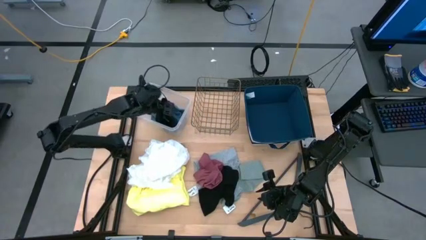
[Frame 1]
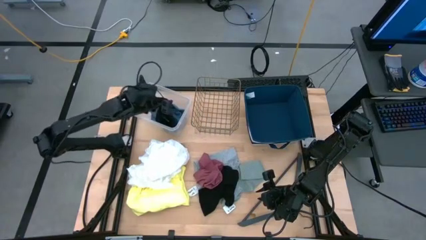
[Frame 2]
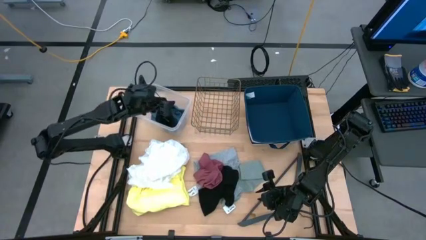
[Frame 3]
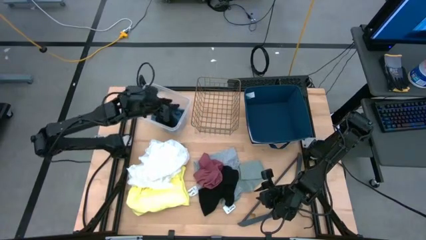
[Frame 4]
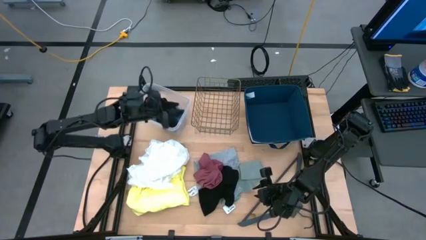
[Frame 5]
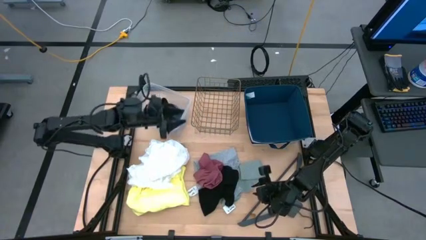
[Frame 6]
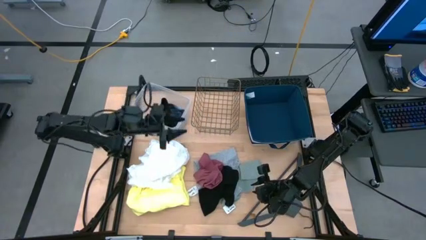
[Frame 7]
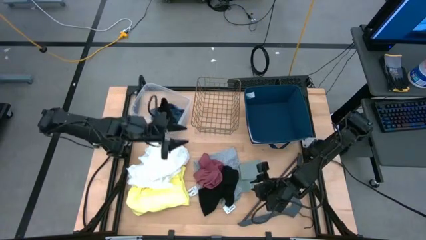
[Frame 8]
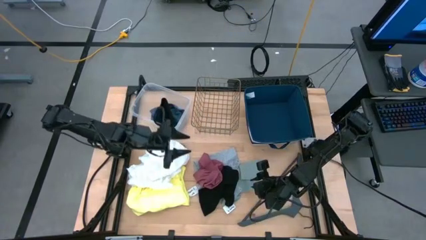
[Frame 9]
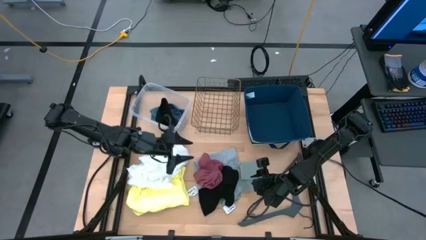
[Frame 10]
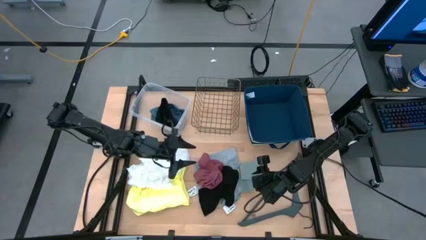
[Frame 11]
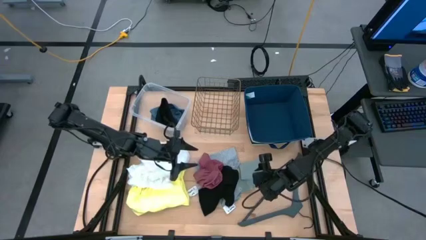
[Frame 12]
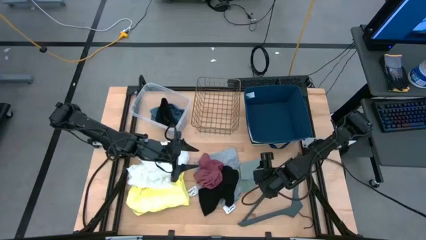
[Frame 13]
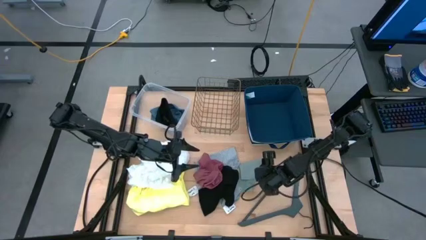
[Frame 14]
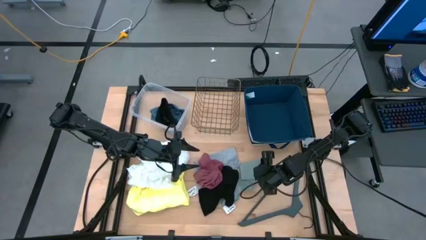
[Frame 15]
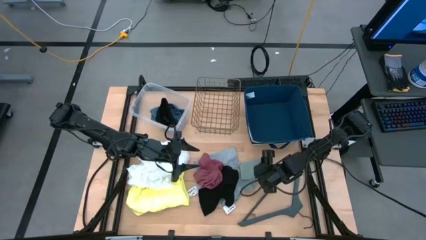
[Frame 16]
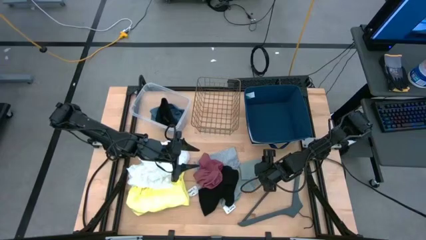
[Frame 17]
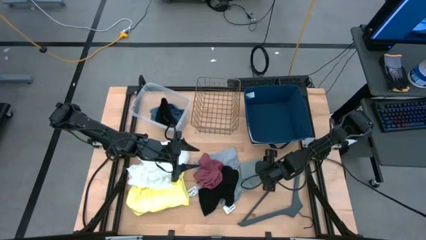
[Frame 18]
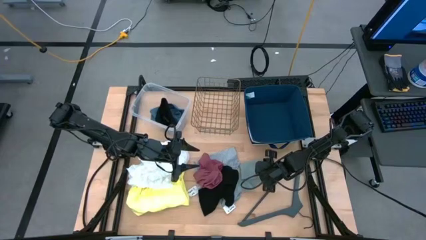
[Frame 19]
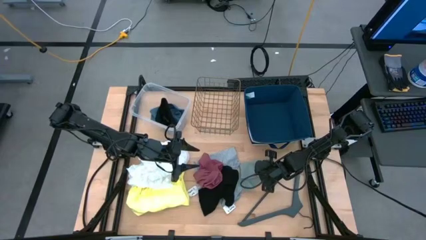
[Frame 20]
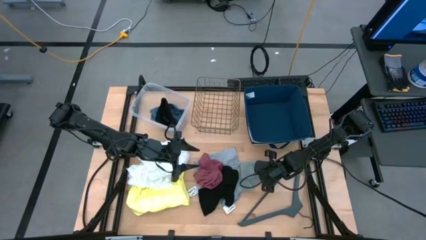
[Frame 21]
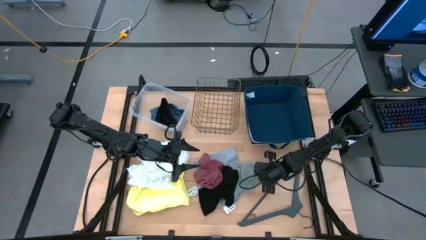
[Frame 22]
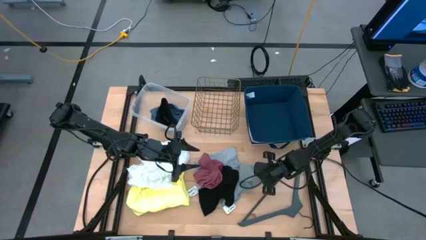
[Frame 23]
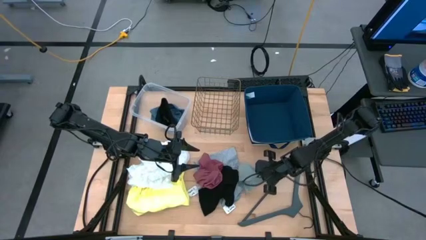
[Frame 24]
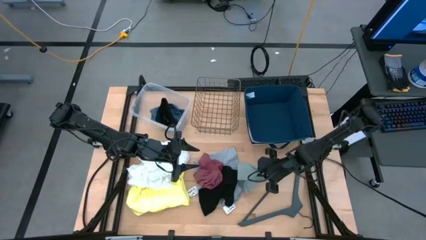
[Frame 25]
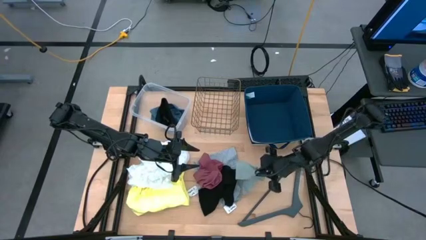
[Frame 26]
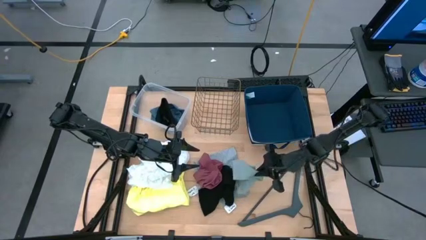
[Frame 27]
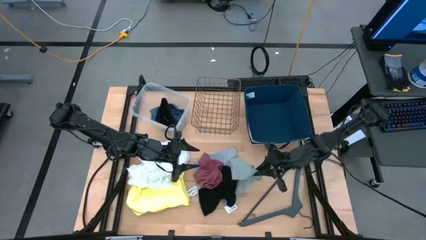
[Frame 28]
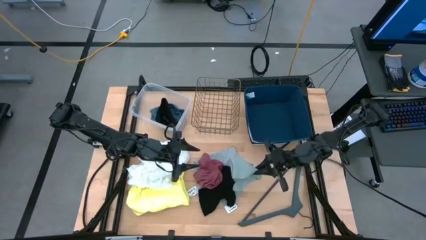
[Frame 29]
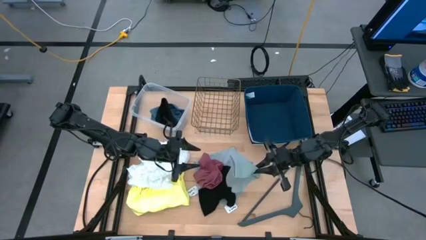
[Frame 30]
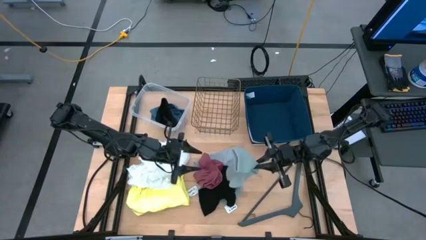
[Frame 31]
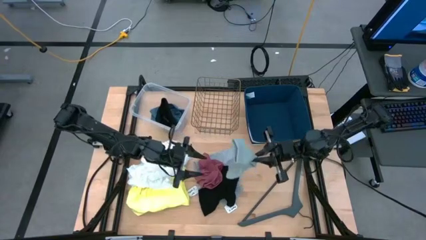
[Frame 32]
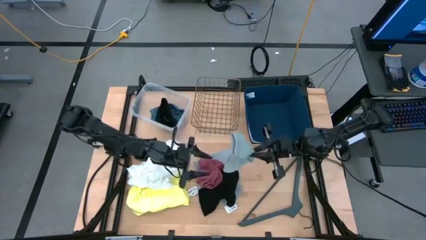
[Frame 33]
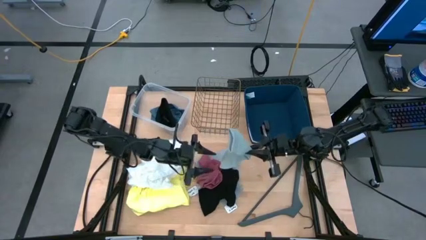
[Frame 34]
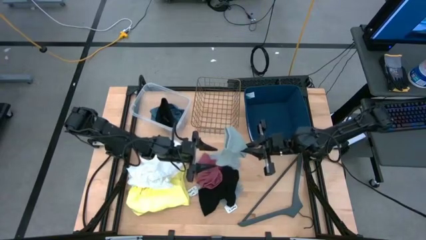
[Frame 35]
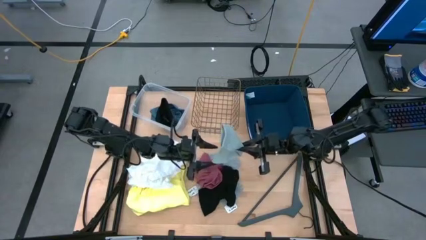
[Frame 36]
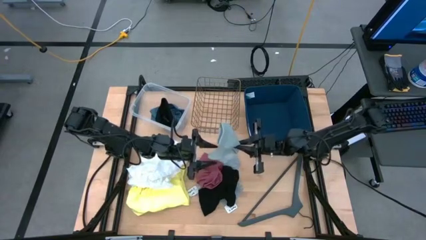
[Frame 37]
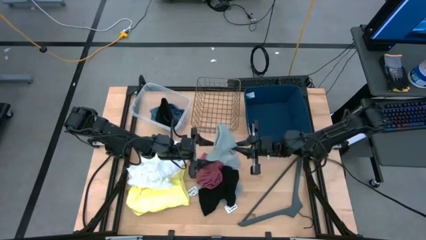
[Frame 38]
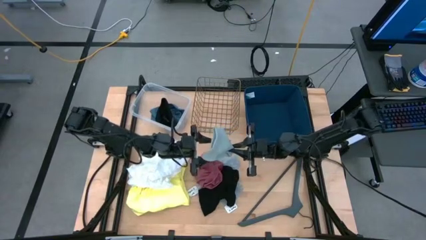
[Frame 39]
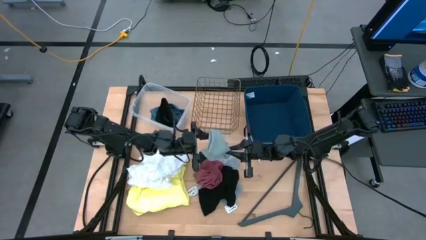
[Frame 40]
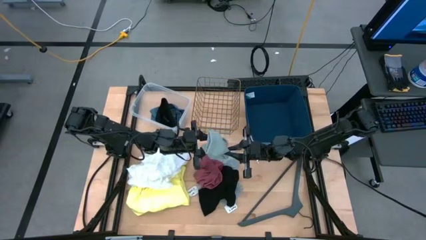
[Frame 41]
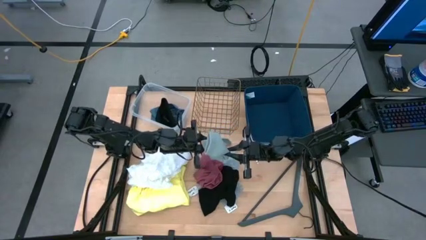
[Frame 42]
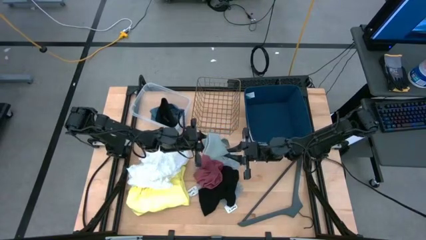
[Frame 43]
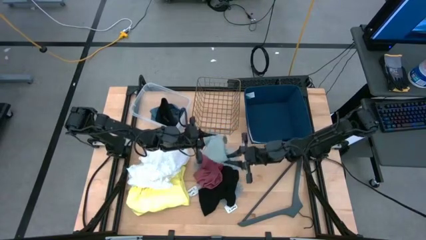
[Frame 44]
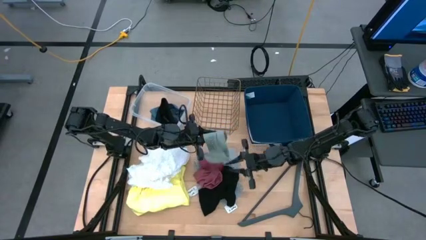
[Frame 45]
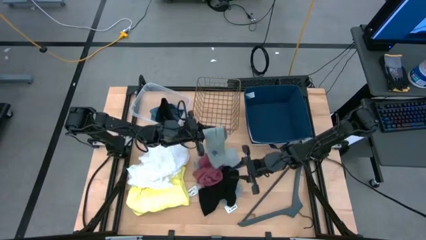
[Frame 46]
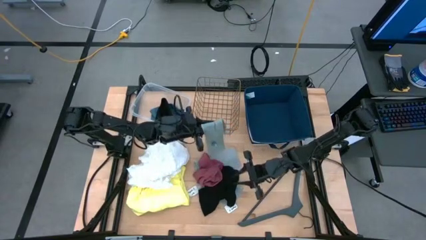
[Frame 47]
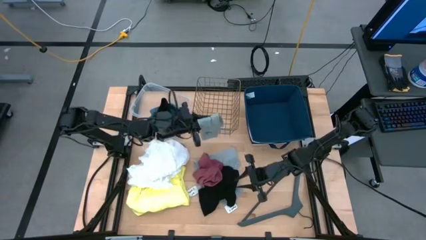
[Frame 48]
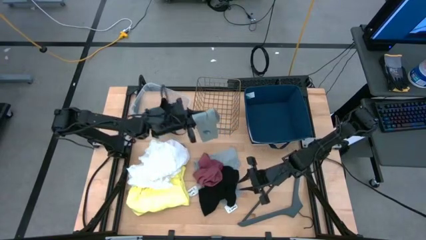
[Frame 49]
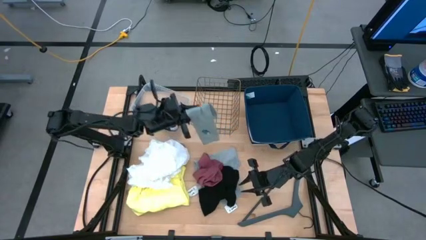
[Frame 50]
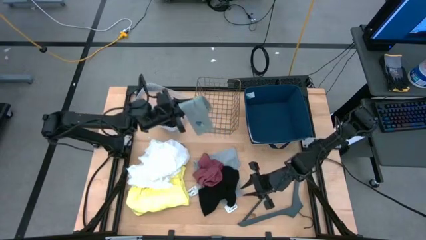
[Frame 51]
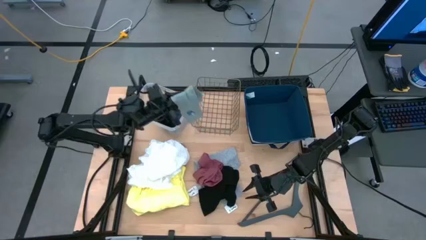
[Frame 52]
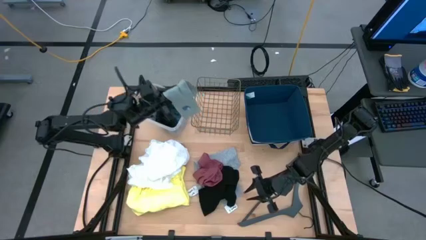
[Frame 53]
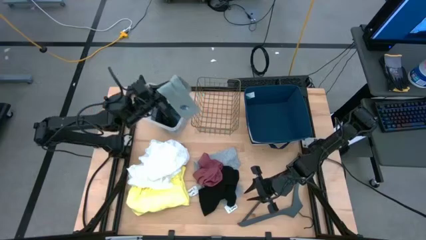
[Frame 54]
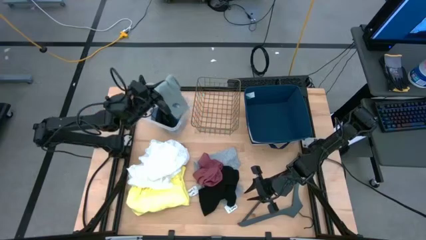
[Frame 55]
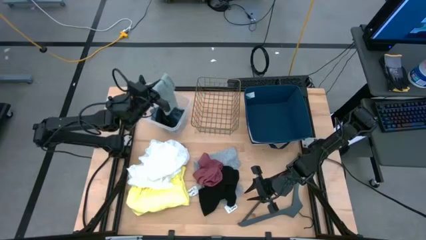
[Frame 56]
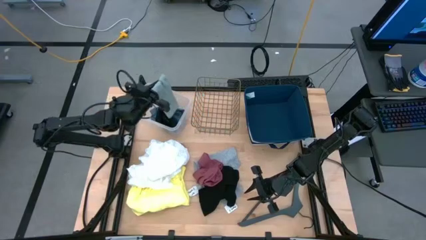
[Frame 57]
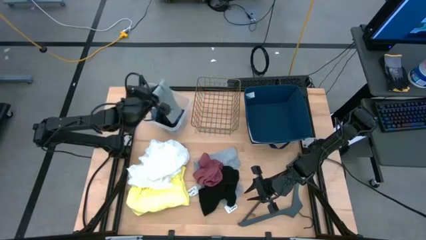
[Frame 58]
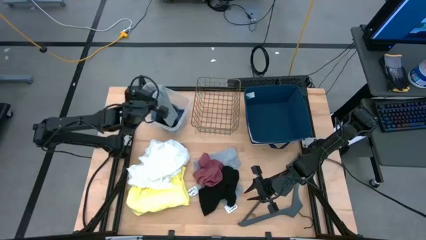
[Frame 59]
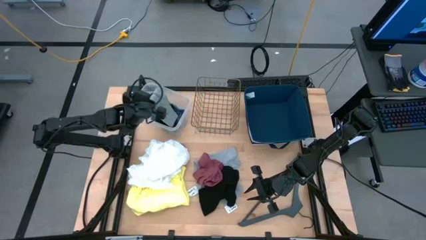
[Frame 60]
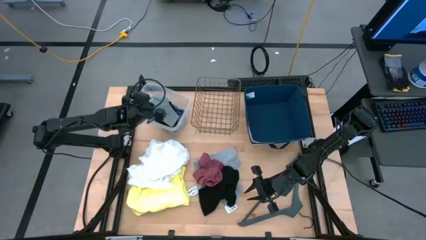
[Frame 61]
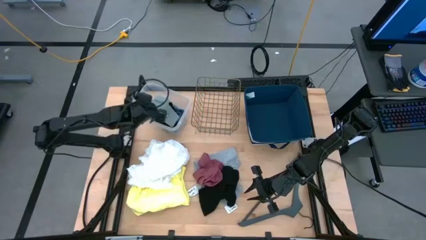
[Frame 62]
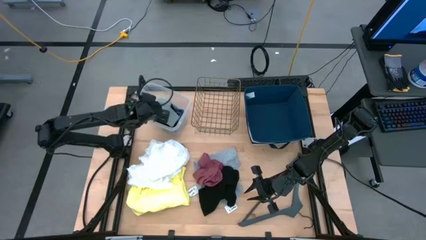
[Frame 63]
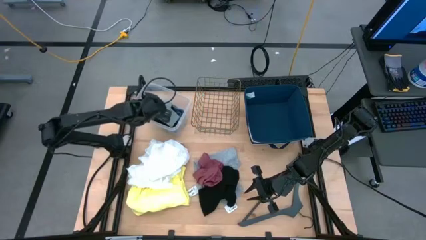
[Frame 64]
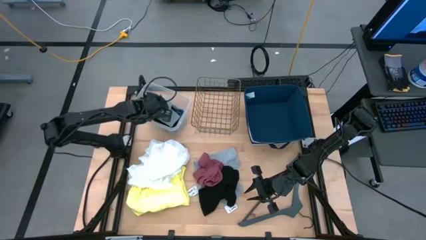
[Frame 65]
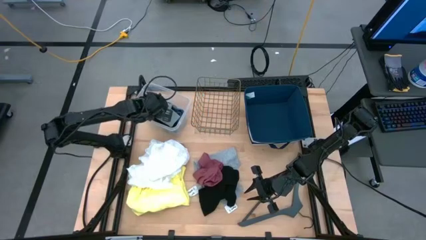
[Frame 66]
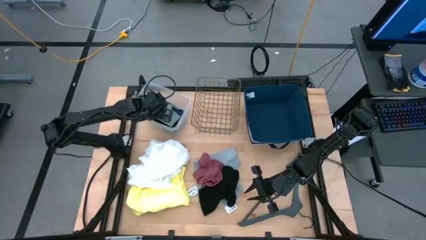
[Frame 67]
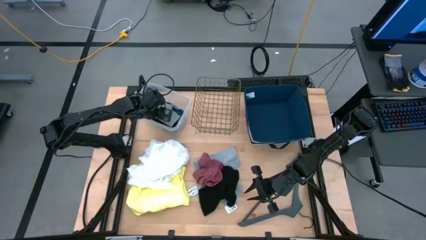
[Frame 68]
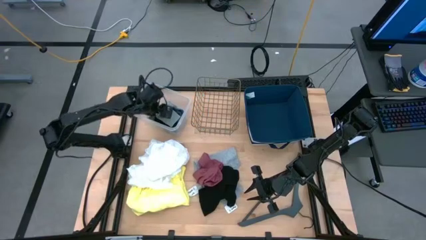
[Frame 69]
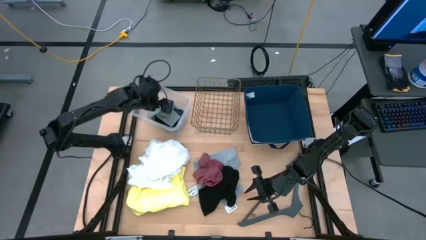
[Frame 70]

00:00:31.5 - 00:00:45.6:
Task: Pick & Place Cloths
Put the gray sock into the transparent bin
